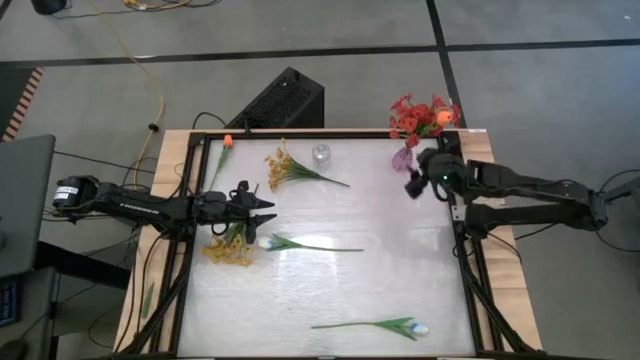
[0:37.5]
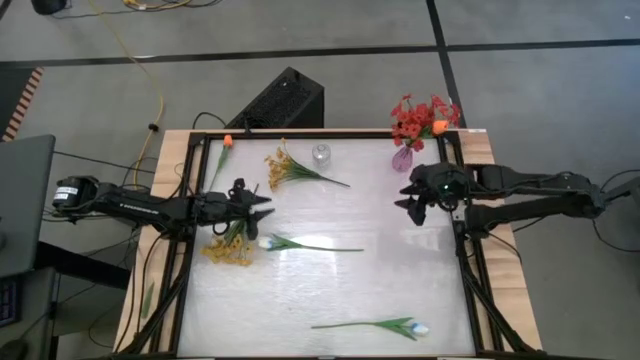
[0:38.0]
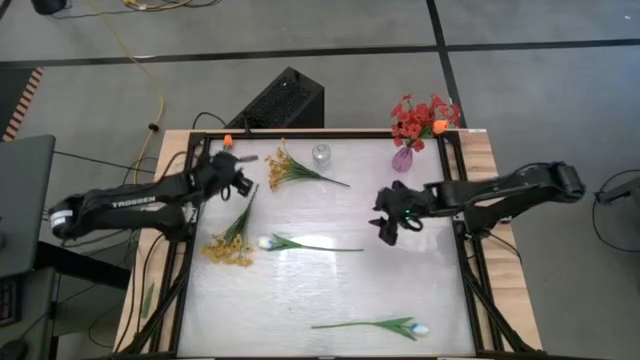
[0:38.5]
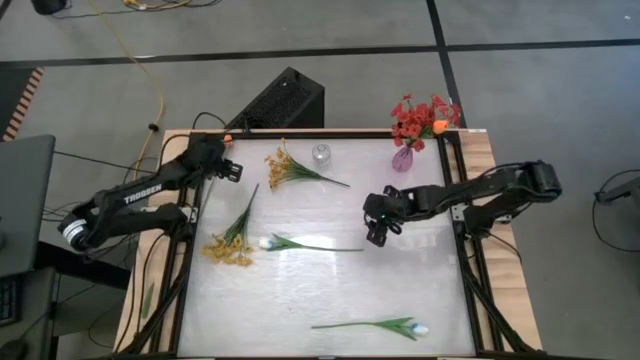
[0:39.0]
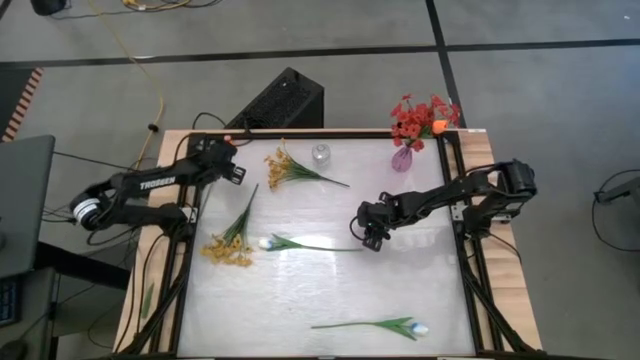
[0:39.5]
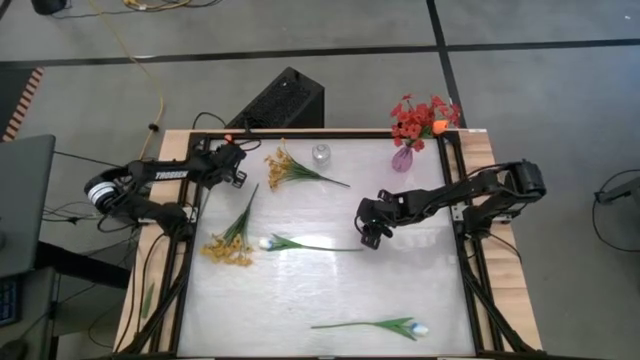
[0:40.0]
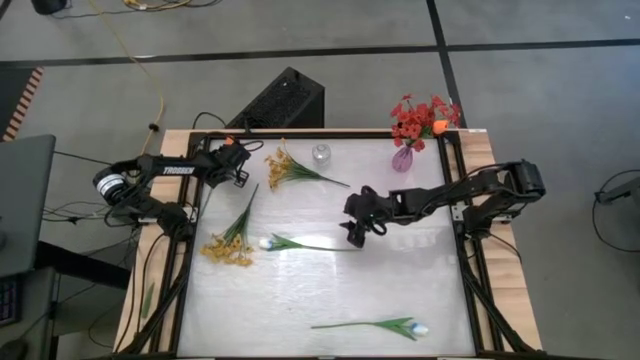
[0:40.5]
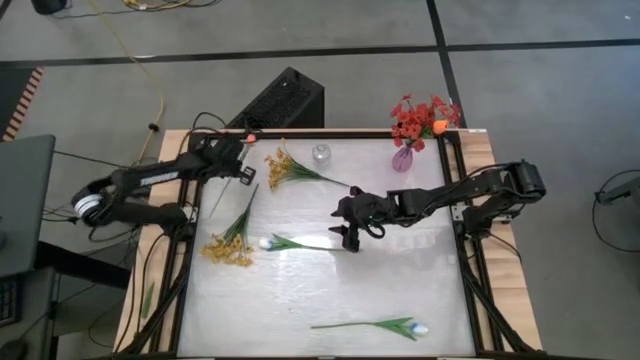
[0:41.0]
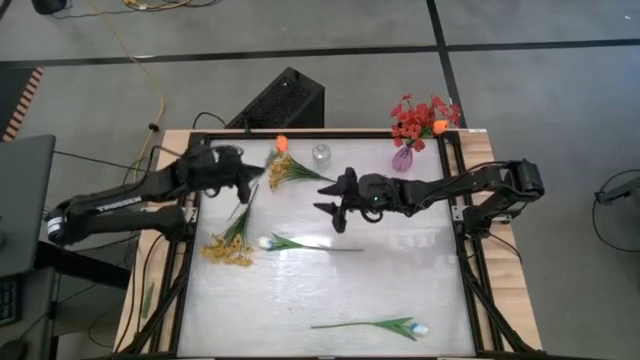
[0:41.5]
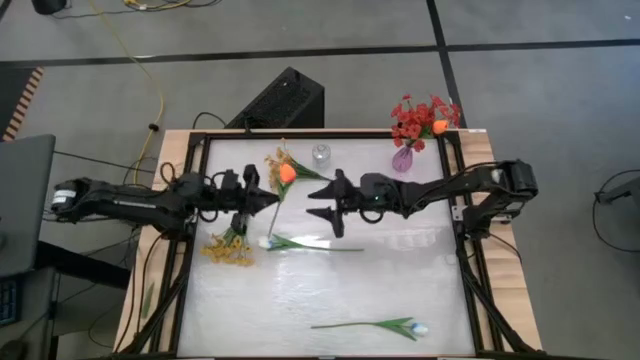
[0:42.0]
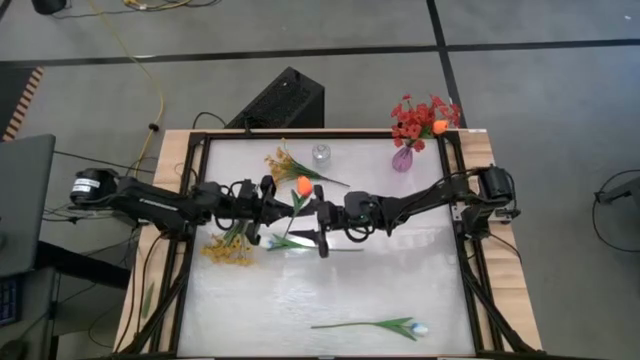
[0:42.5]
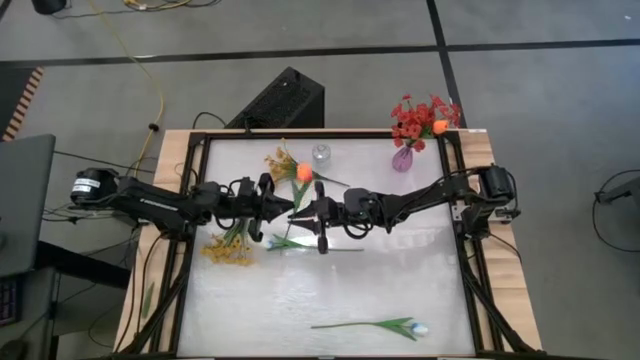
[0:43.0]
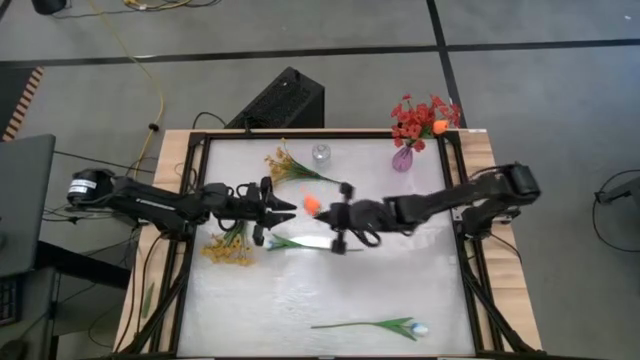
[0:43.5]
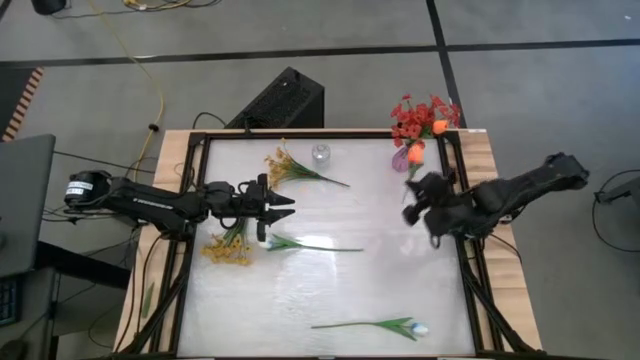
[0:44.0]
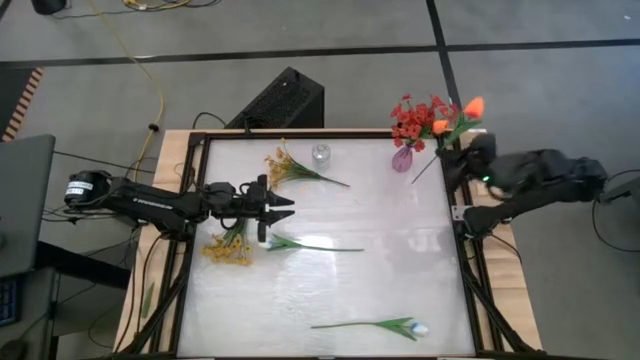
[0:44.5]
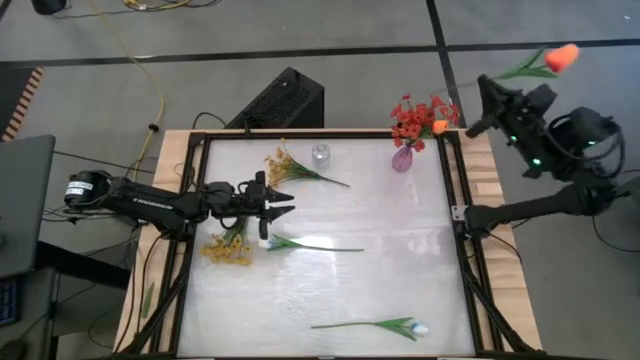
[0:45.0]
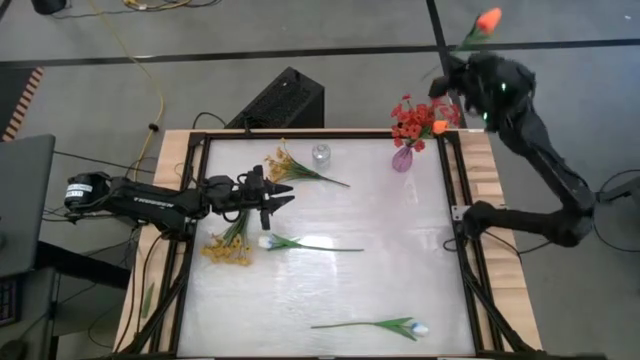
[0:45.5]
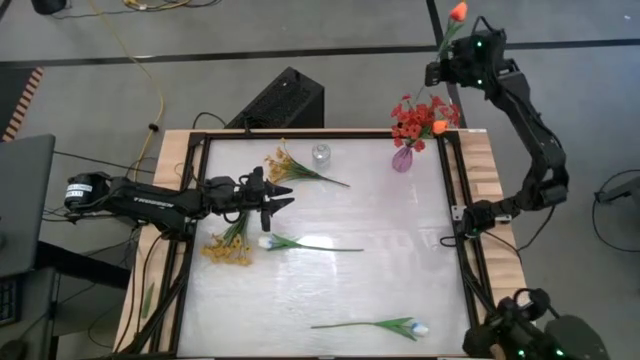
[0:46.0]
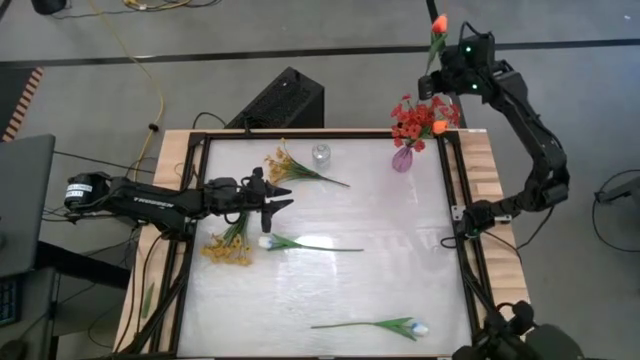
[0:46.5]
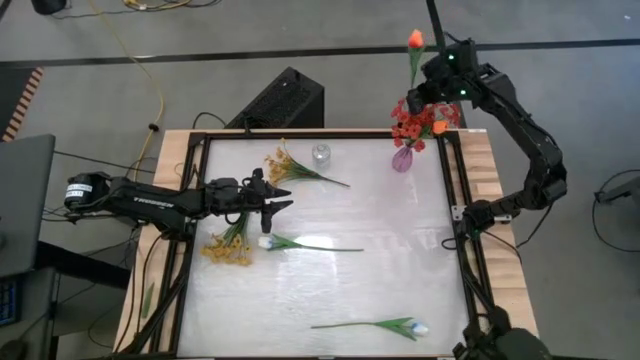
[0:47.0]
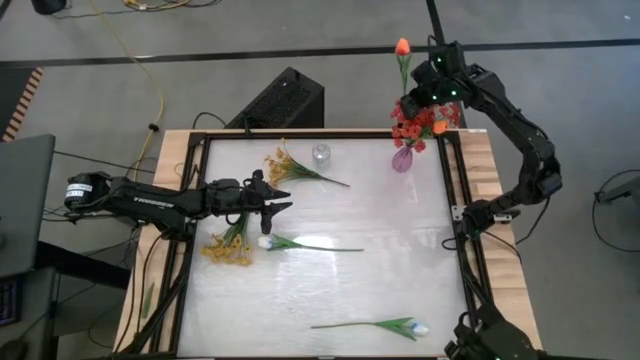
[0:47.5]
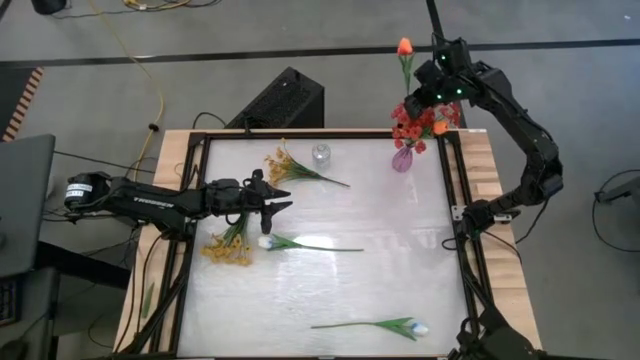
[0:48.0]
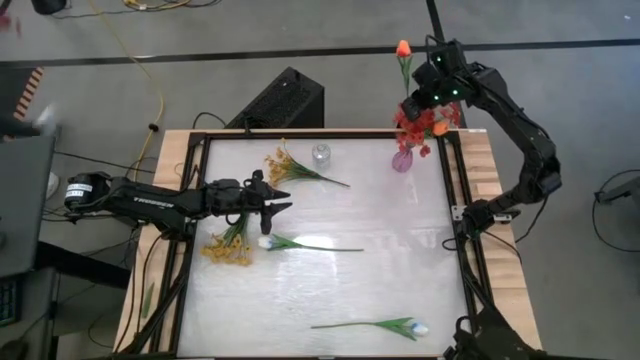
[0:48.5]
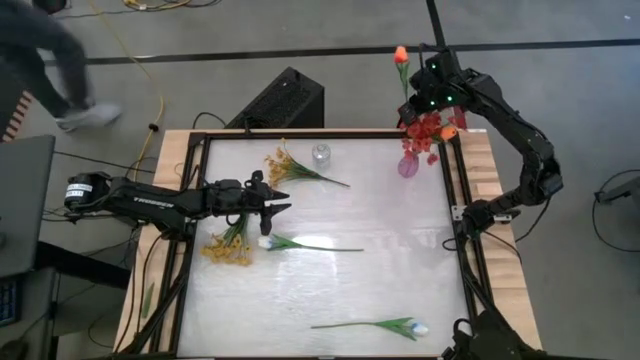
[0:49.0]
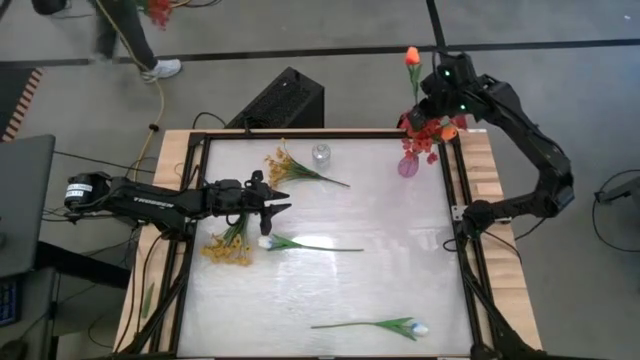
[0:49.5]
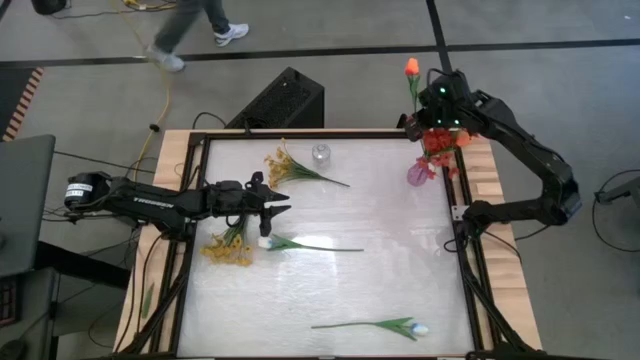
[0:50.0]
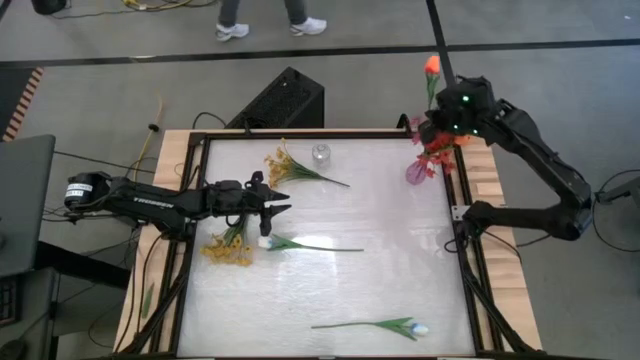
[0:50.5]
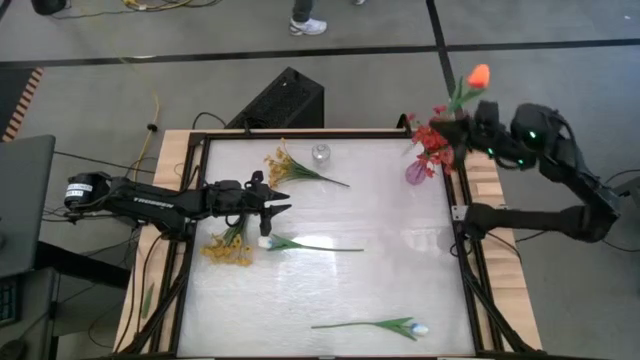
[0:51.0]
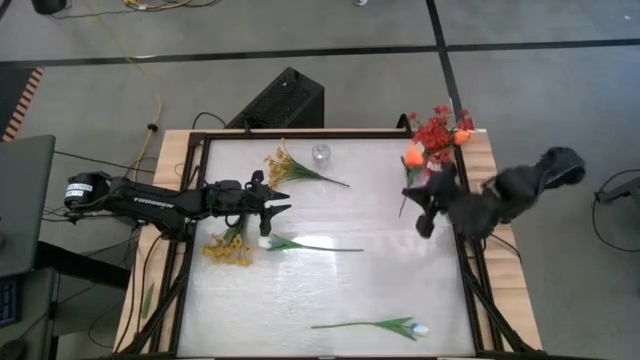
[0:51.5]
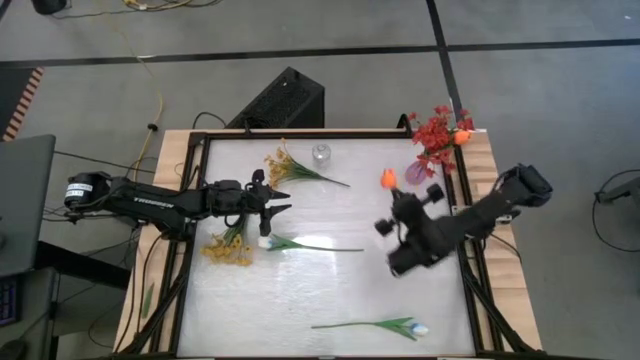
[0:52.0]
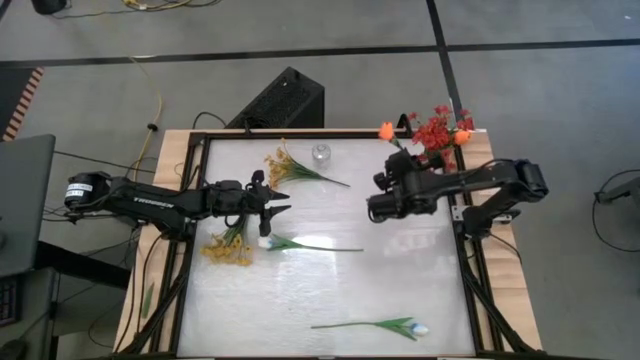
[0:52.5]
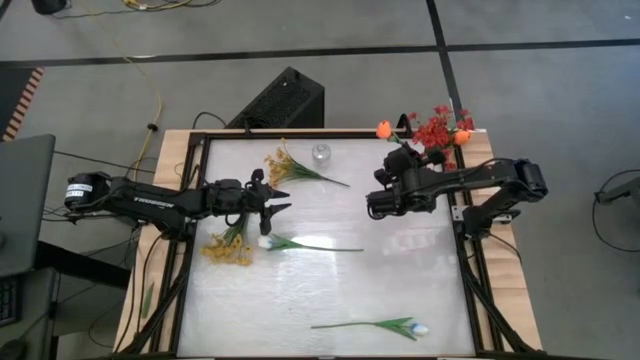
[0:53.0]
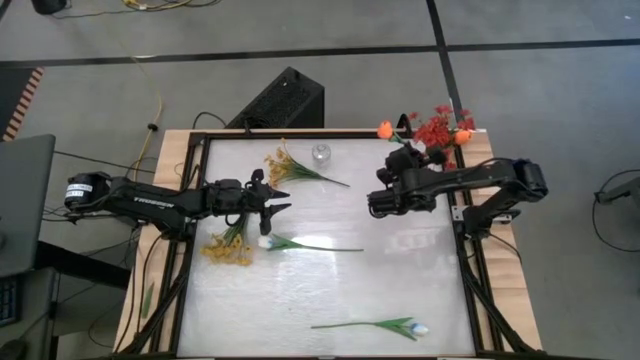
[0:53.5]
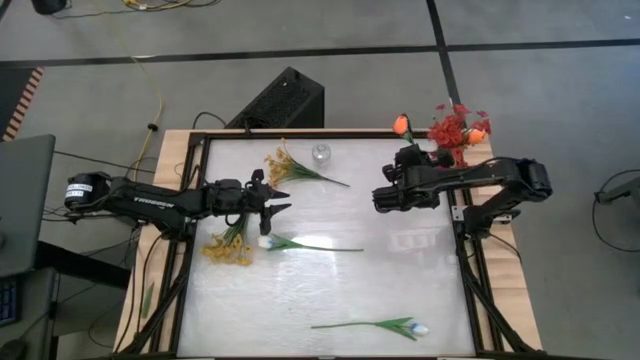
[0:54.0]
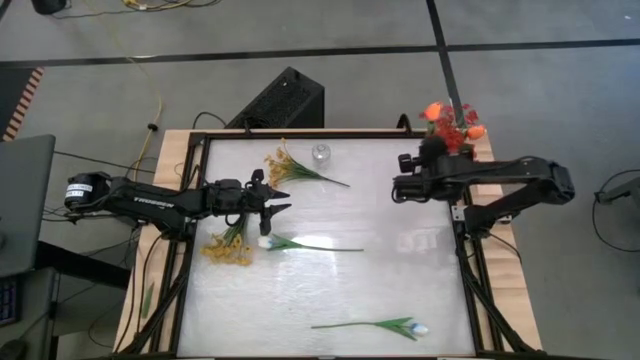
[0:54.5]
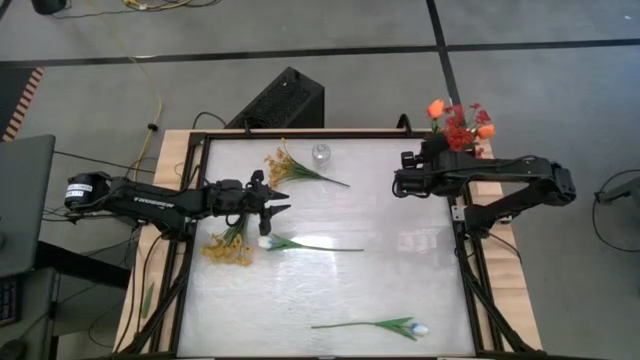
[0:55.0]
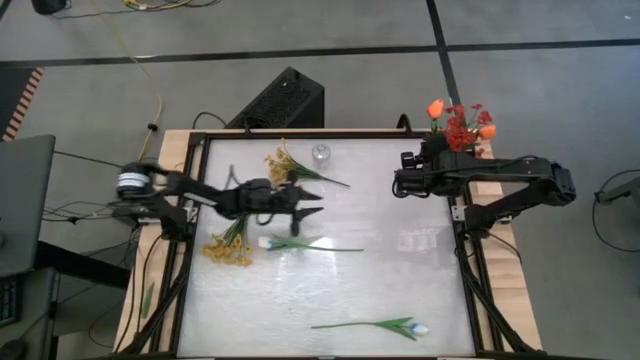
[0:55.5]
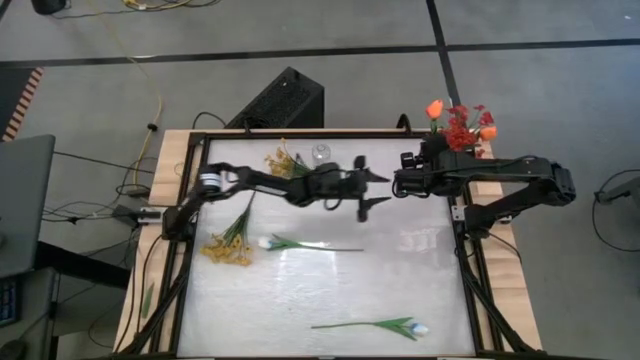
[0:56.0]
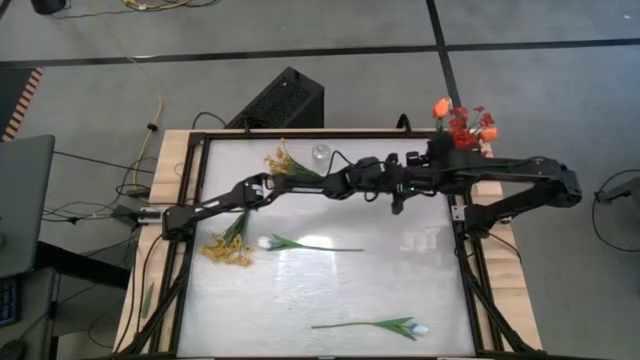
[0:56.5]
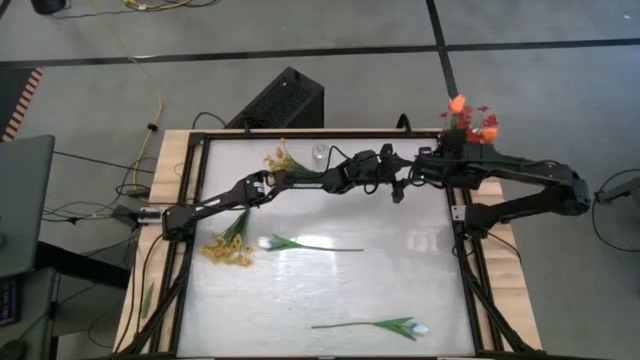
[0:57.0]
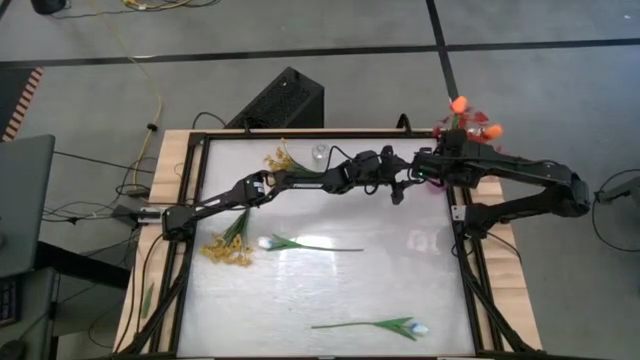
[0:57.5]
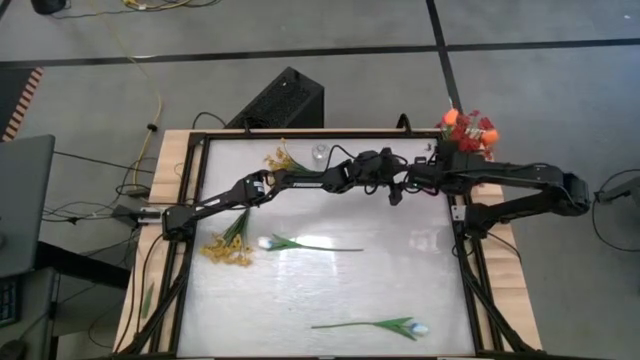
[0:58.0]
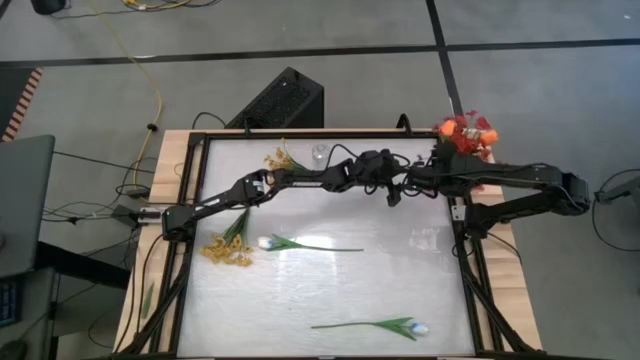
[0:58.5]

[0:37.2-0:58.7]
Task: Sort flowers into vase by color
Put the orange tulip into the purple vase
